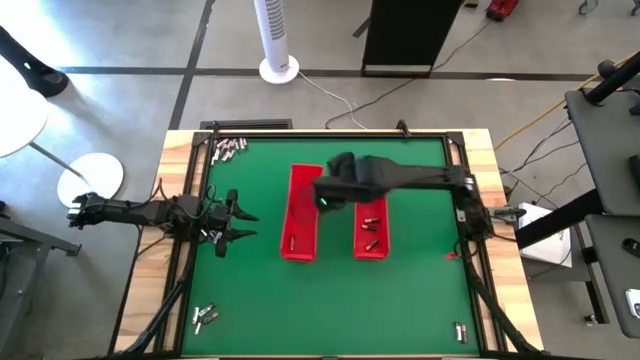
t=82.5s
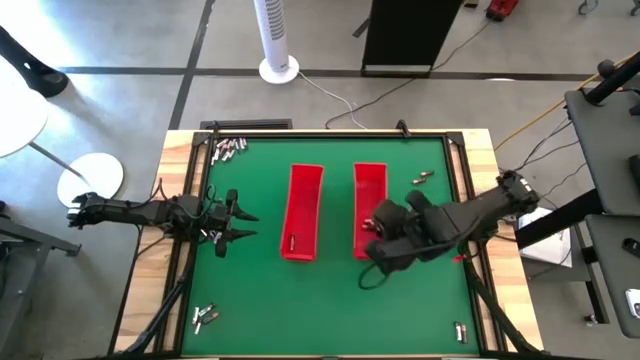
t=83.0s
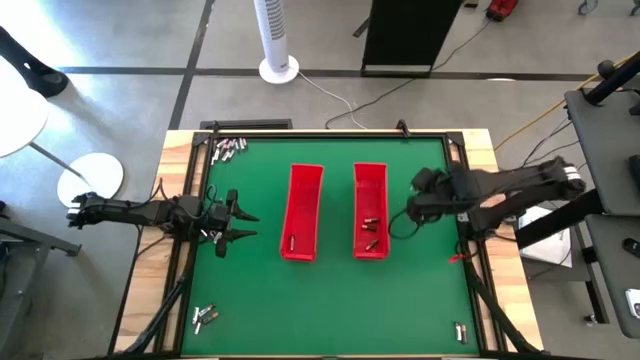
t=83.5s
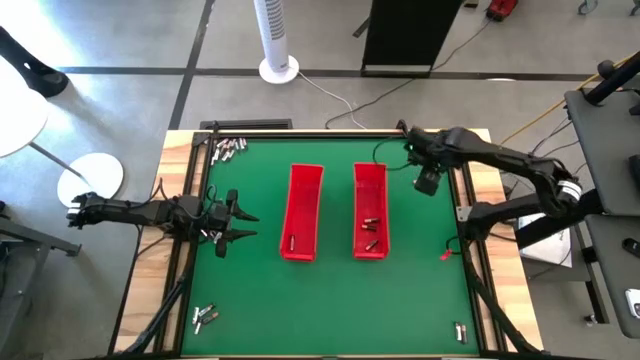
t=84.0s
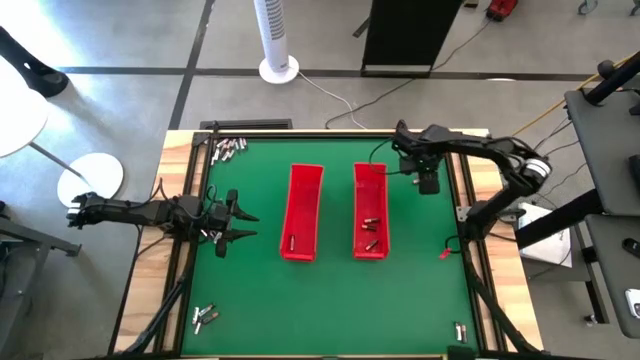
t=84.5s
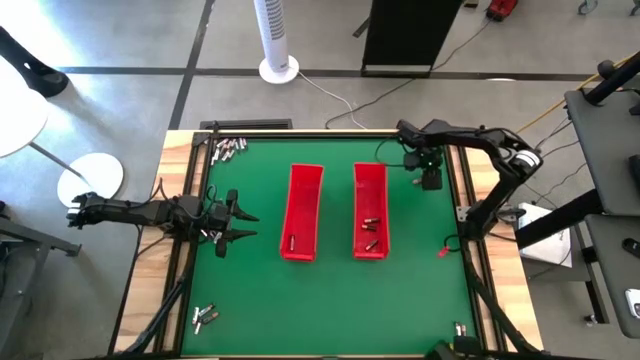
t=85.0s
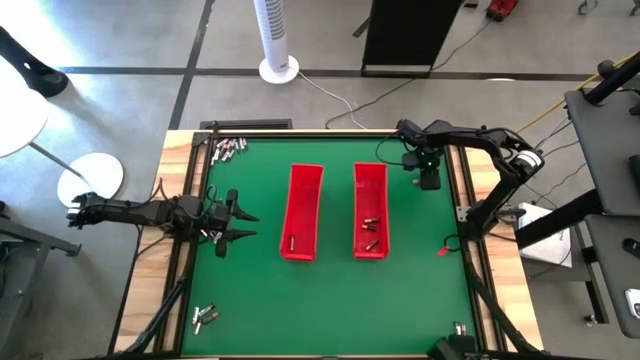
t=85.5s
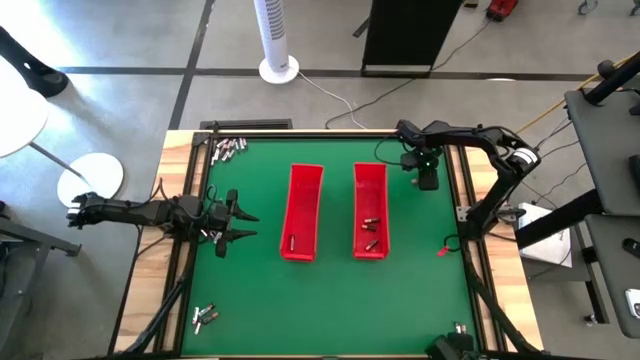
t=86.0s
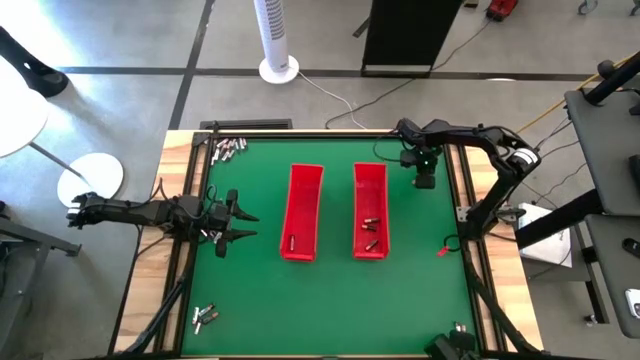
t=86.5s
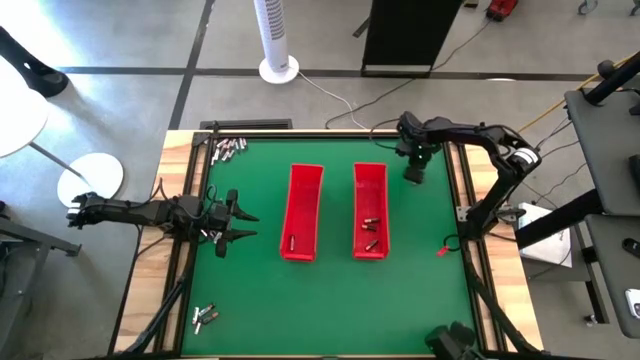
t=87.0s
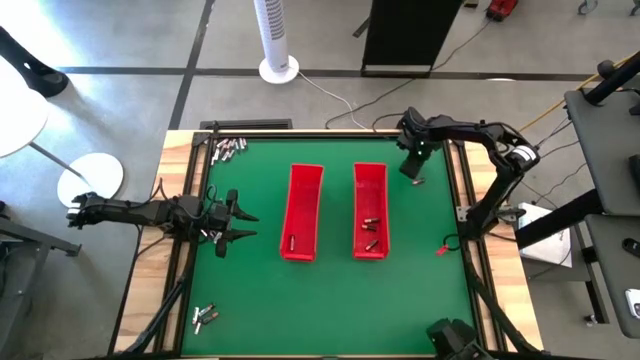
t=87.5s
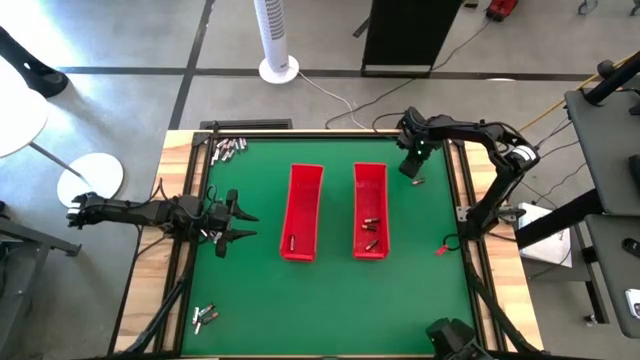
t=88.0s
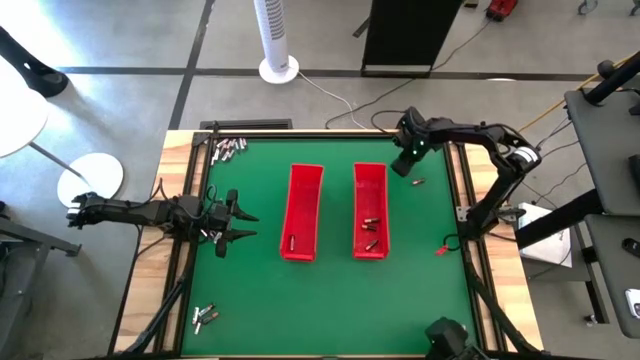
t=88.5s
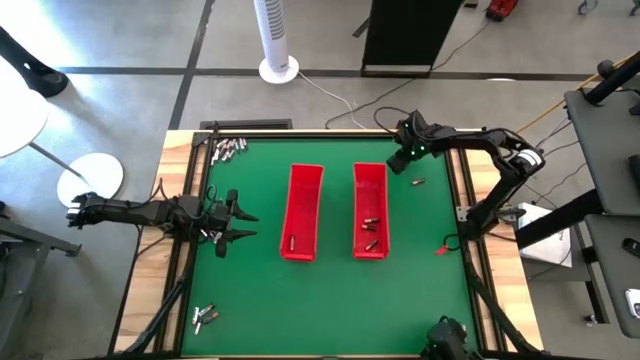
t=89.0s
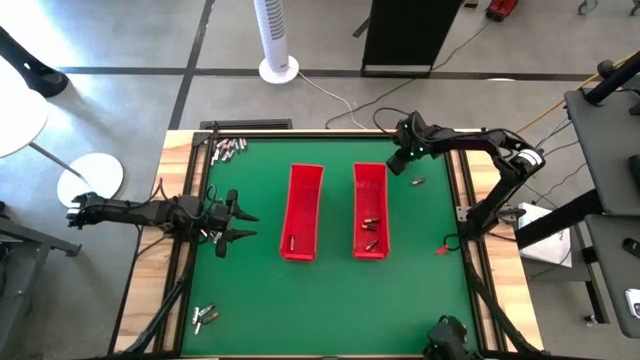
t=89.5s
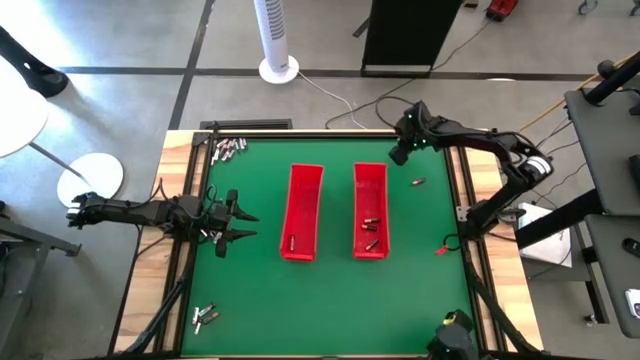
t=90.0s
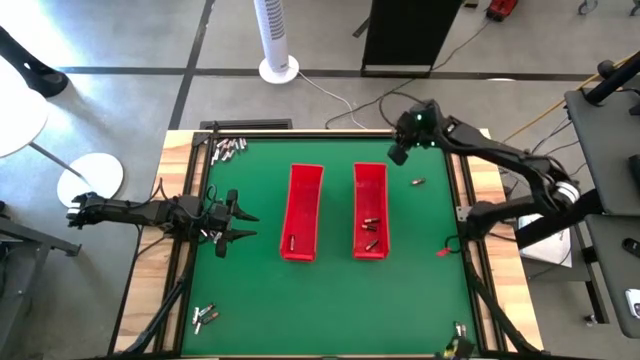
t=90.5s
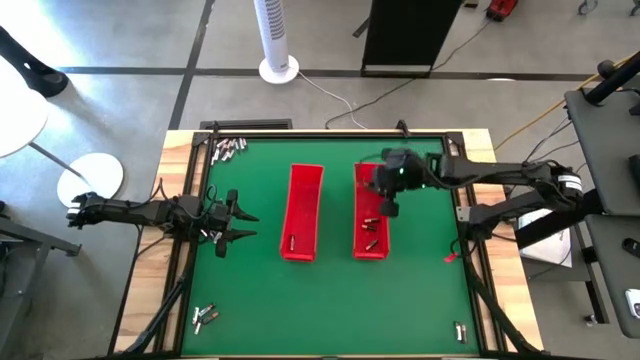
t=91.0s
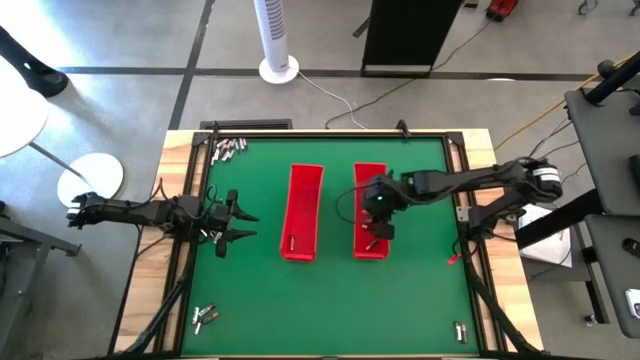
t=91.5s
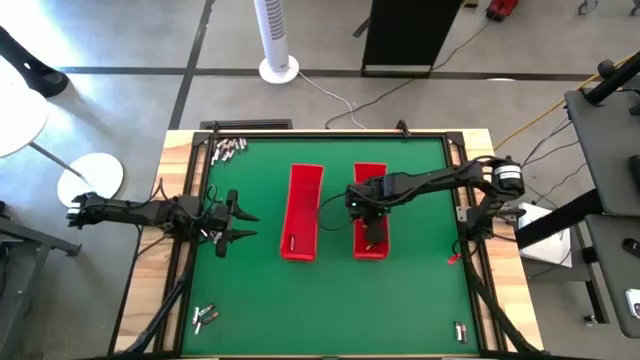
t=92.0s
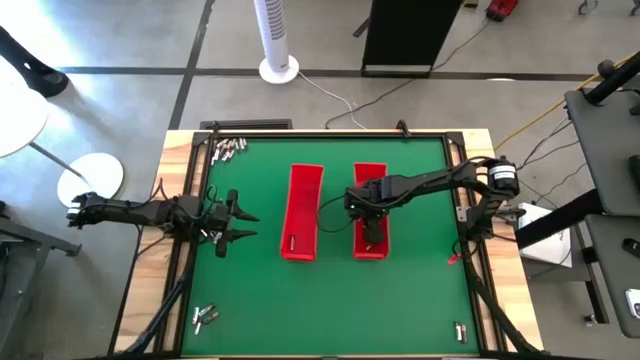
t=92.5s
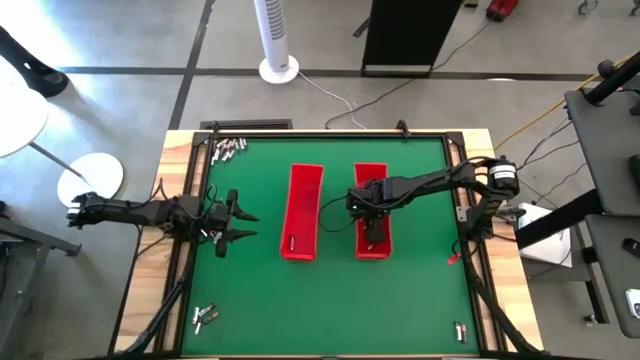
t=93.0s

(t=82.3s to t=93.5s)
Task: Sort batteries
Put the black battery into the right red bin

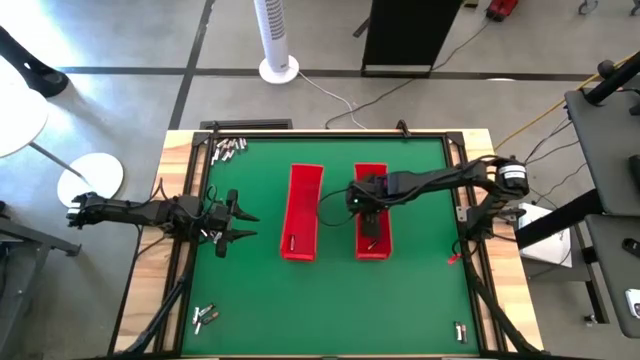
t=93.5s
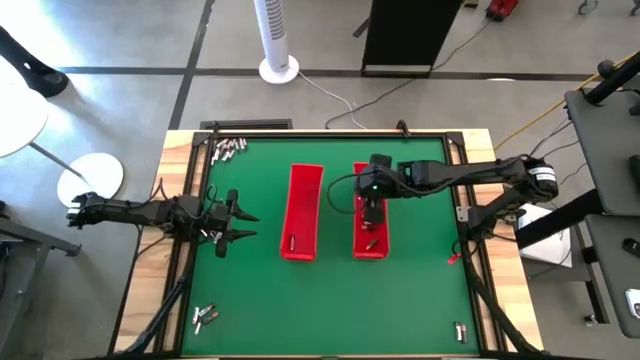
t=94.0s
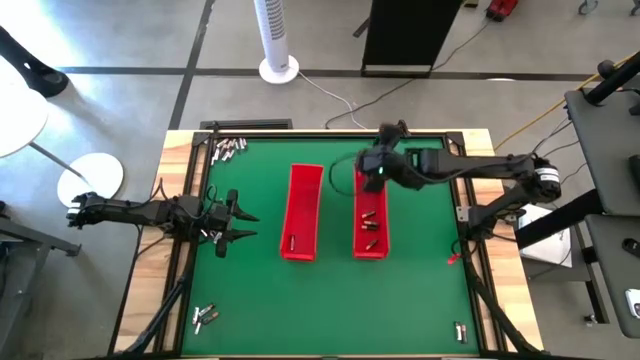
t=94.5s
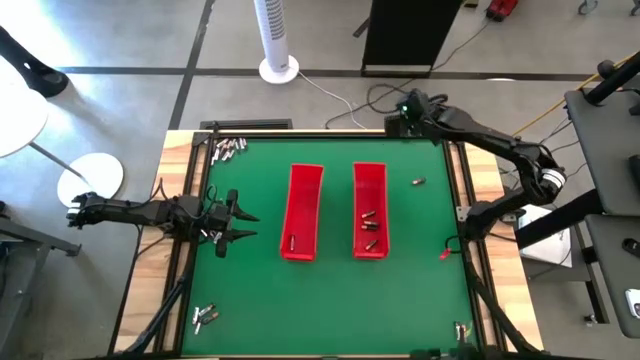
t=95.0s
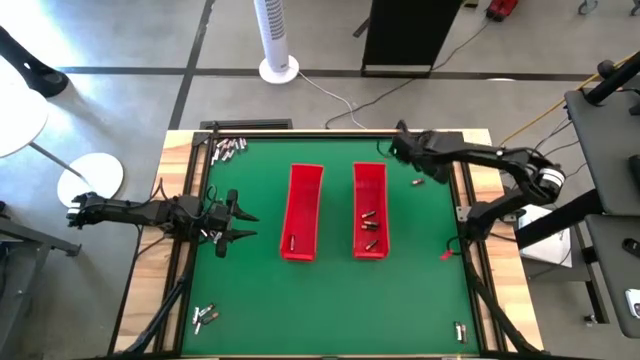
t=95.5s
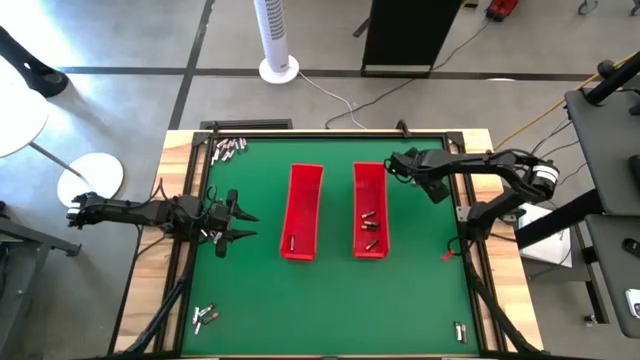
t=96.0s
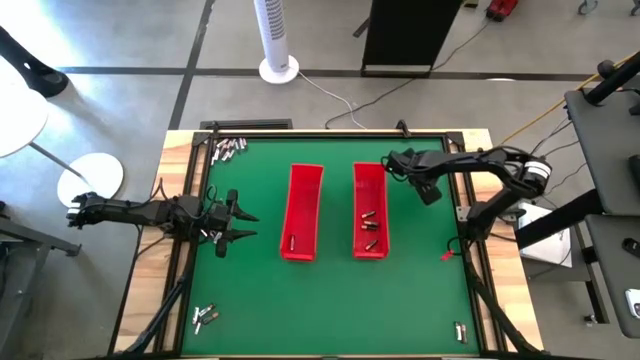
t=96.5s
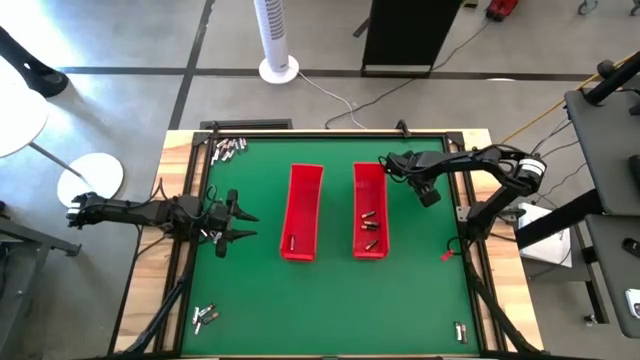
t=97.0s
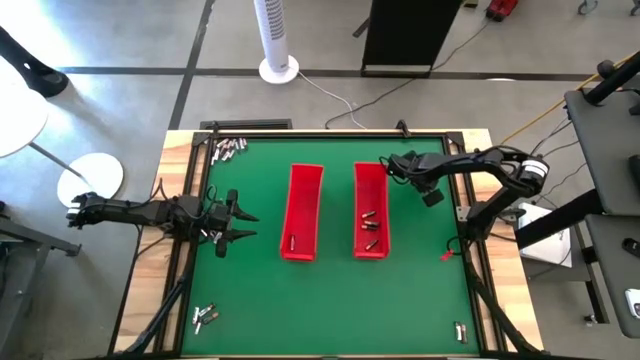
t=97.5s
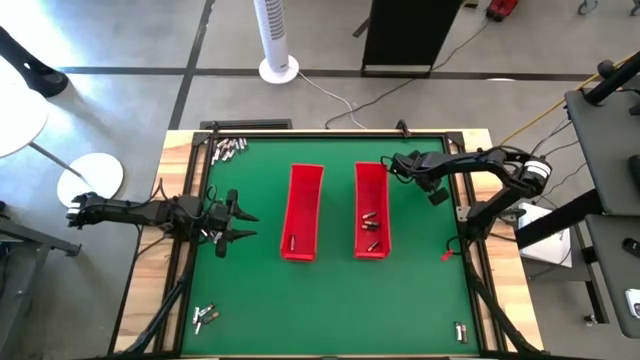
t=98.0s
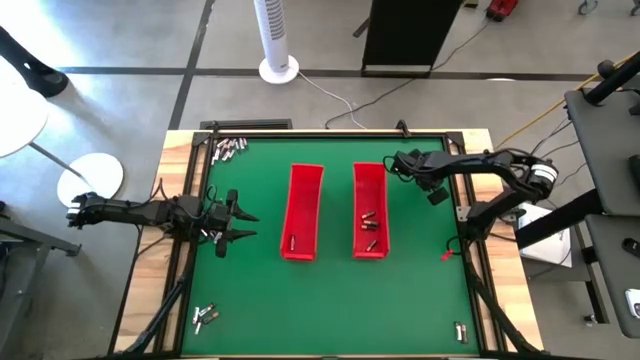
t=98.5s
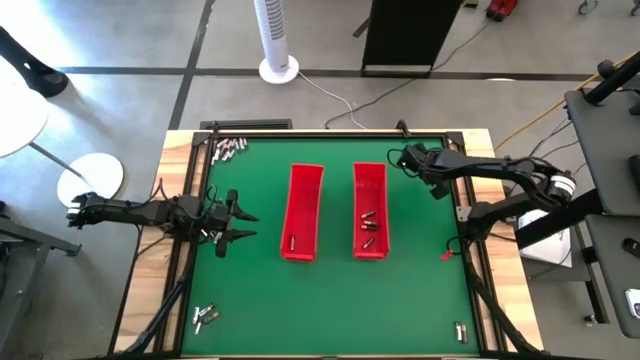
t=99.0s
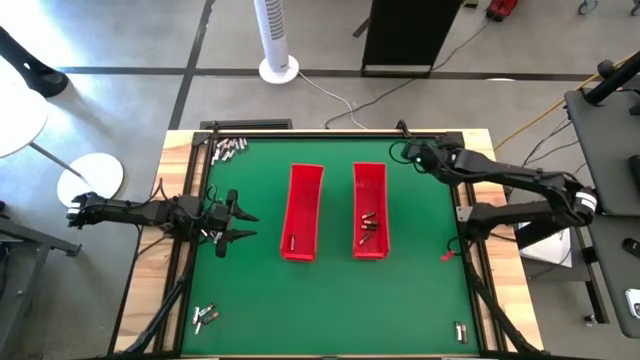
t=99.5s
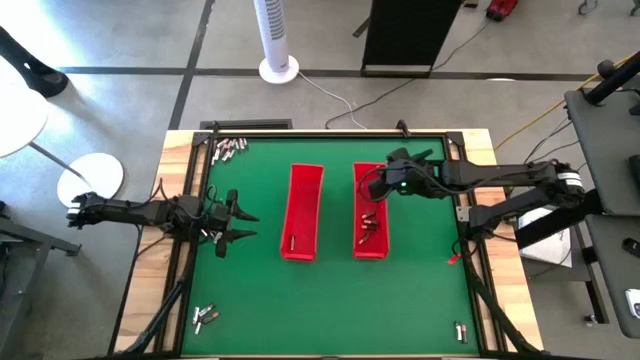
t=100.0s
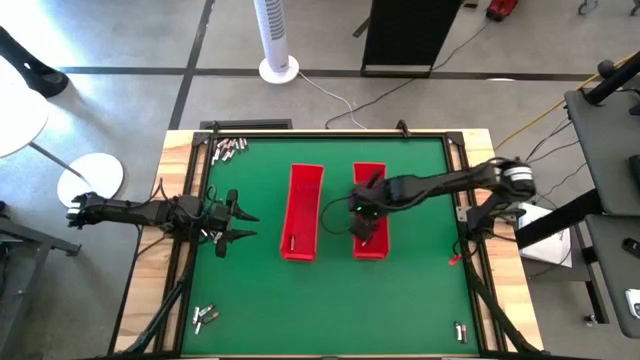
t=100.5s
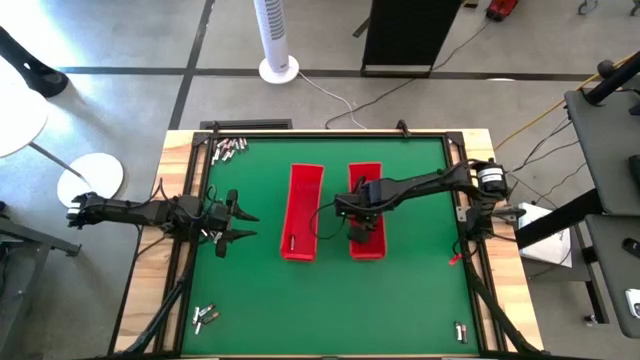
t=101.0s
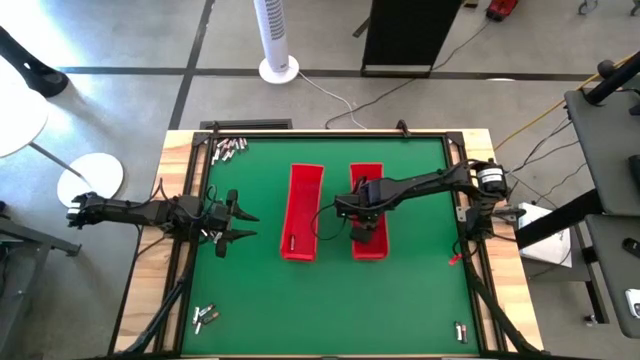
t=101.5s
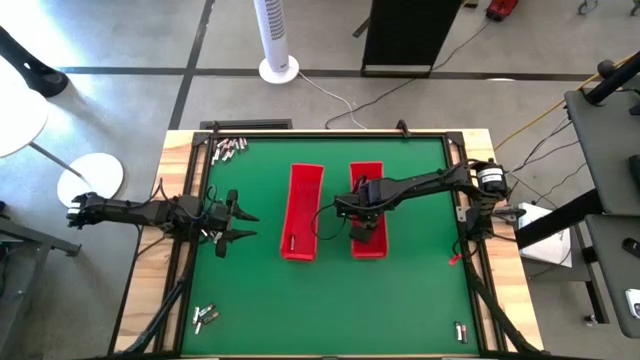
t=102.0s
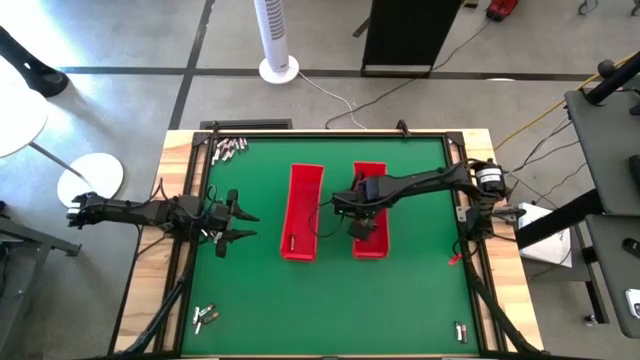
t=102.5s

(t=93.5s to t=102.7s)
Put the black battery into the right red bin
